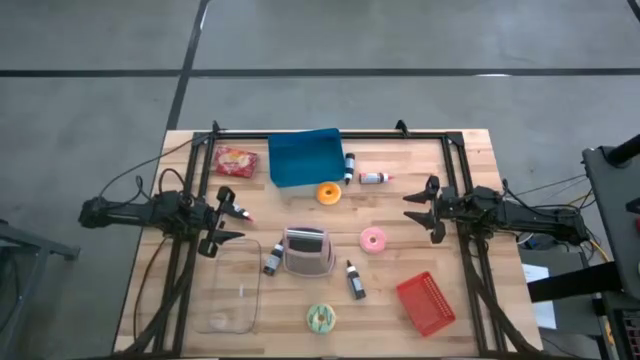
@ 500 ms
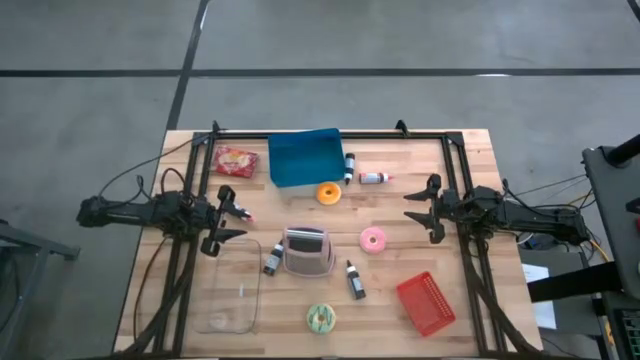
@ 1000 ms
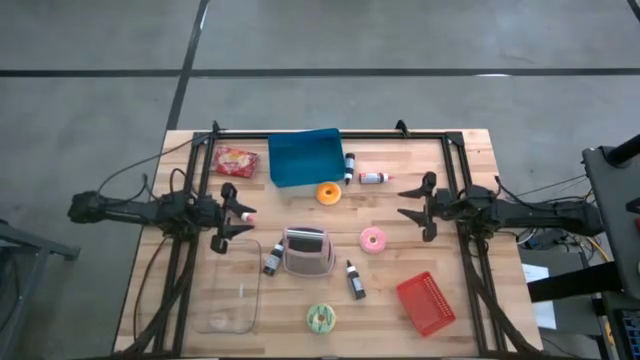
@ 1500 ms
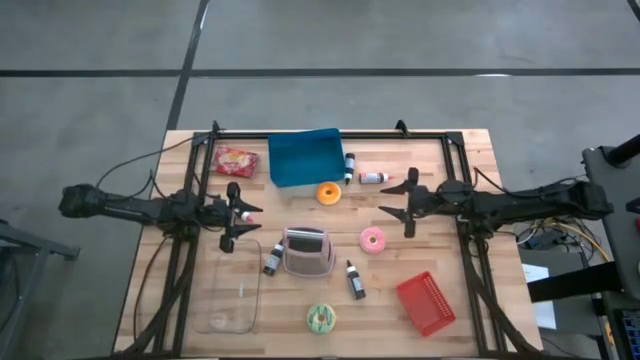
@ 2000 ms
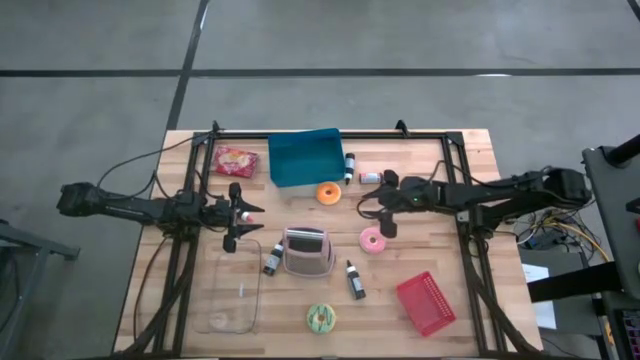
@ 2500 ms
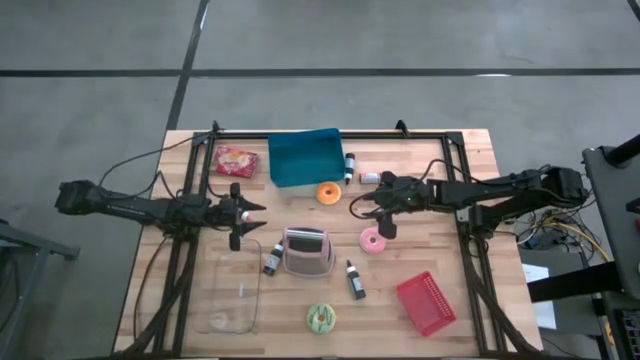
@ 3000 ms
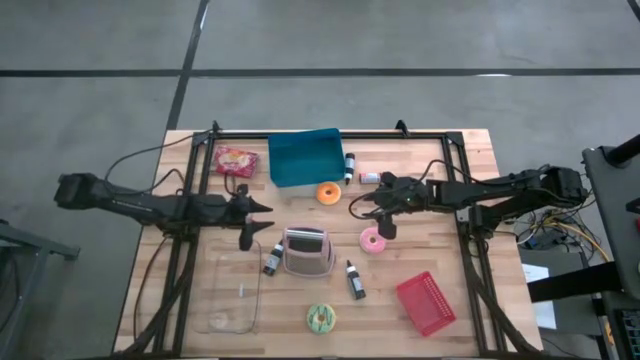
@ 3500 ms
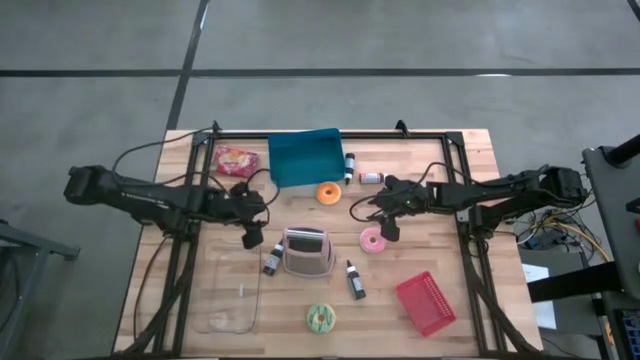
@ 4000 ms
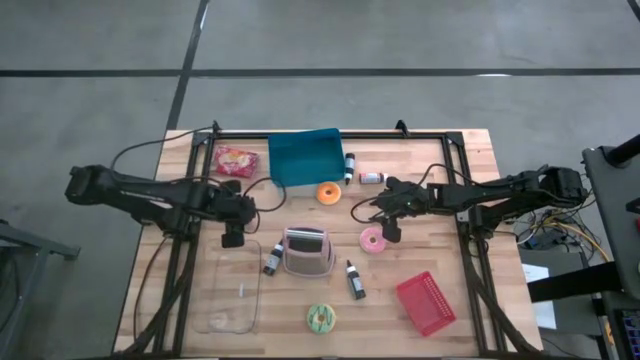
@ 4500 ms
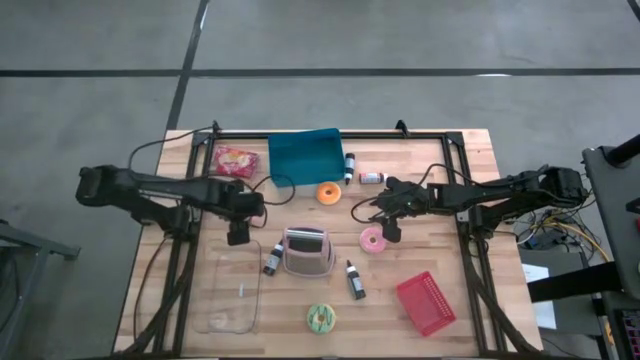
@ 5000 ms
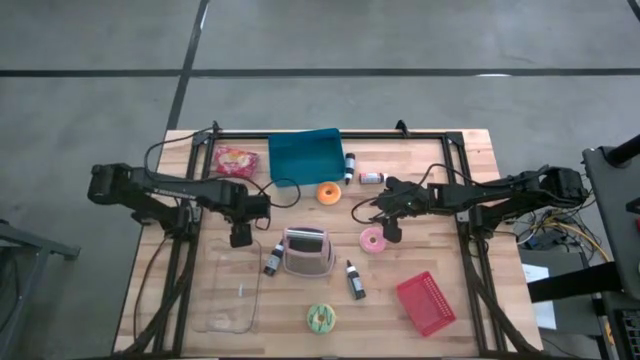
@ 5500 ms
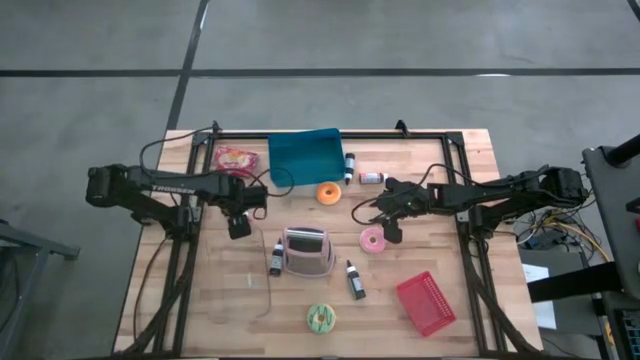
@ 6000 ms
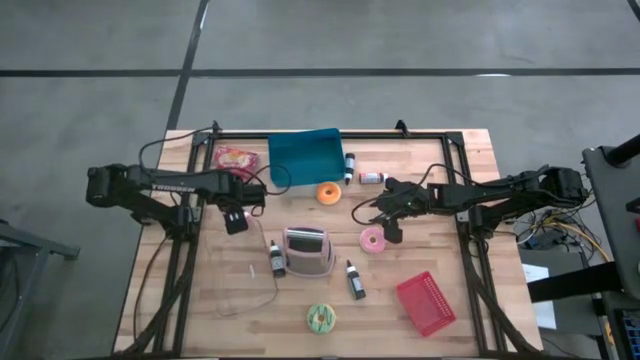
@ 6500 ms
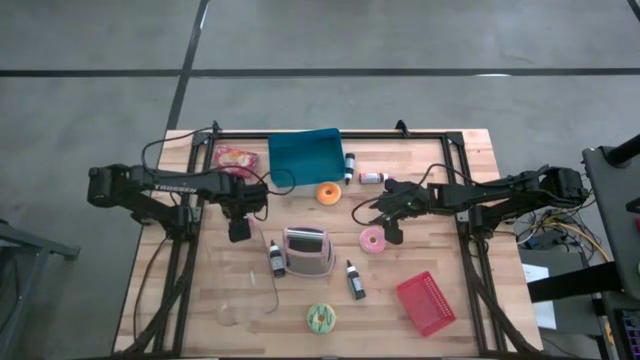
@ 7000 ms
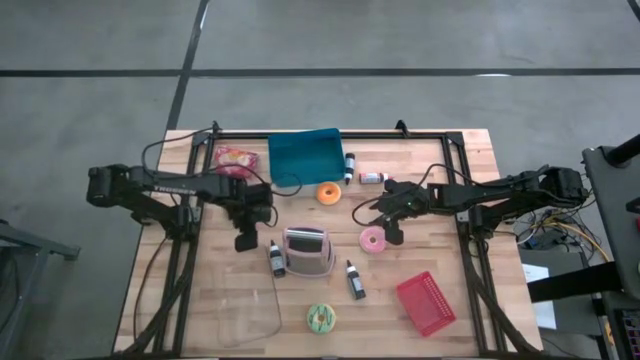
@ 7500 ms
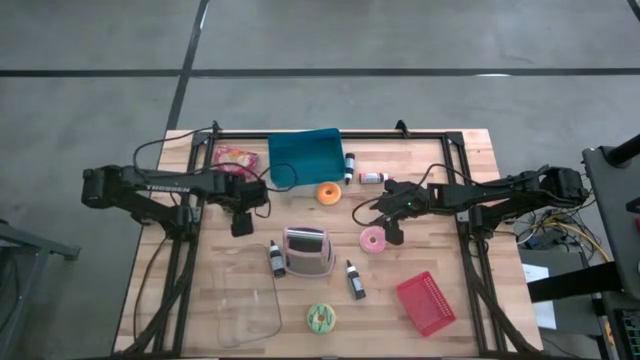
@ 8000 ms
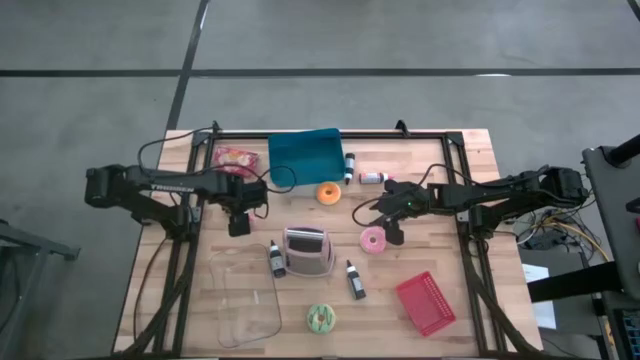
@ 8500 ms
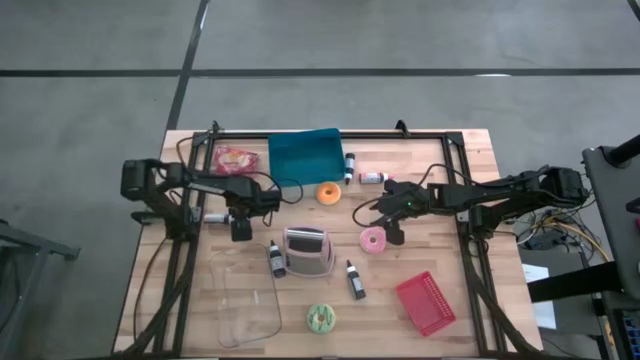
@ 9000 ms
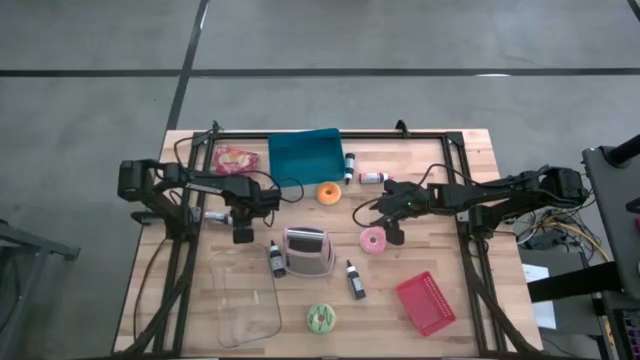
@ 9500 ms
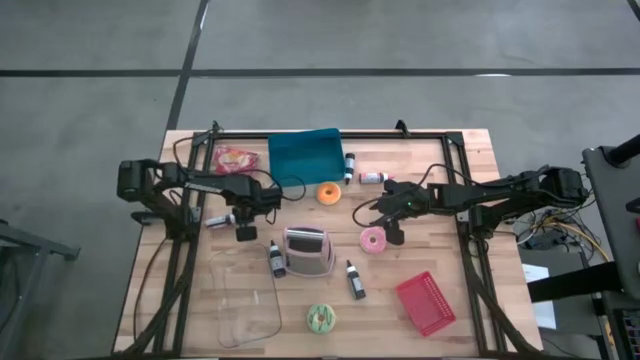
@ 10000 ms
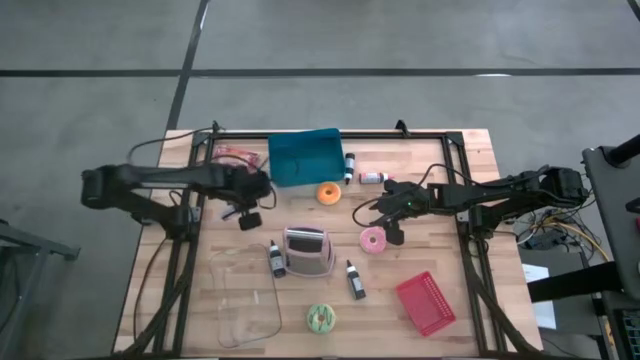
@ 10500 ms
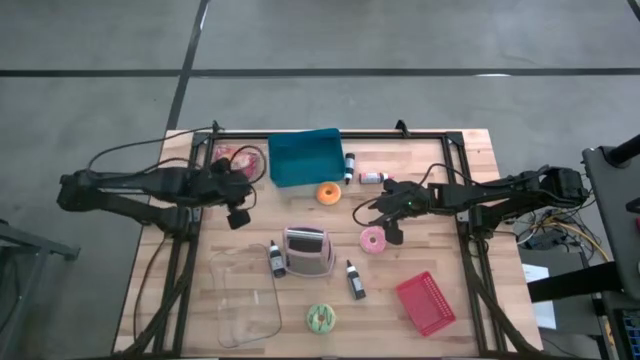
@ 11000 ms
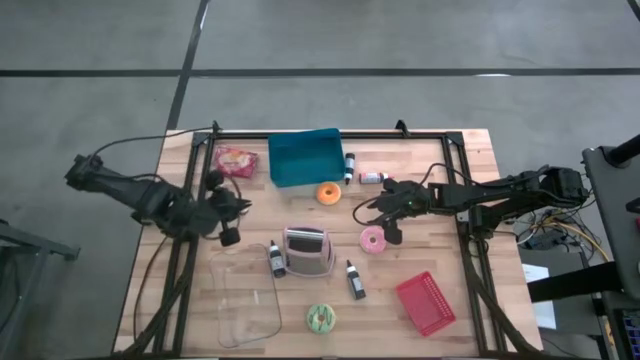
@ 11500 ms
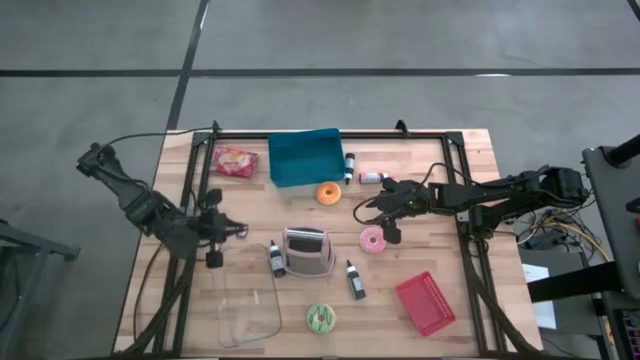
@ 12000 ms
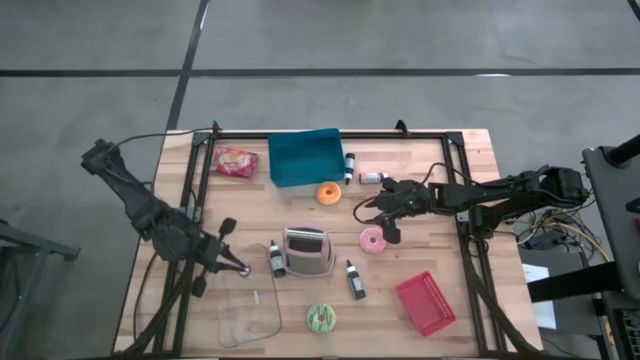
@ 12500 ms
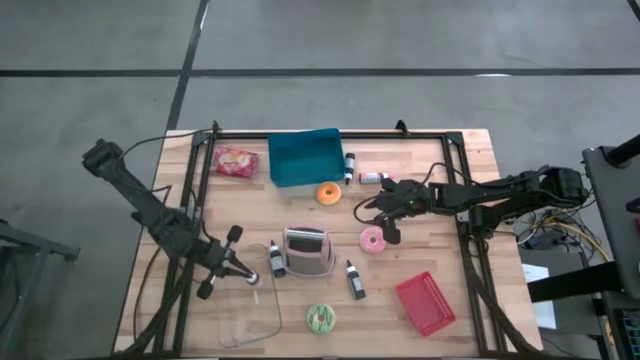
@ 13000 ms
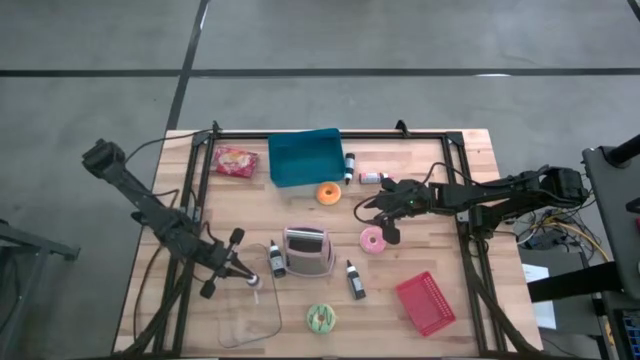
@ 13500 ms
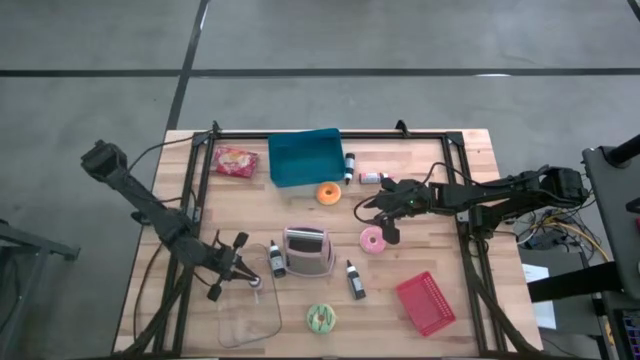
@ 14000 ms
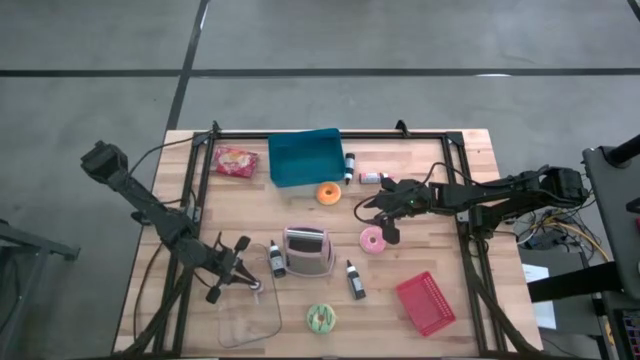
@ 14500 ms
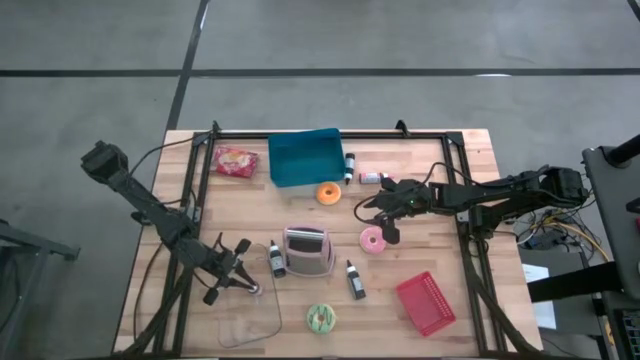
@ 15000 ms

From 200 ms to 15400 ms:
Task: Pick & Place Food Item
Put the left pink food coloring bottle into the transparent bin

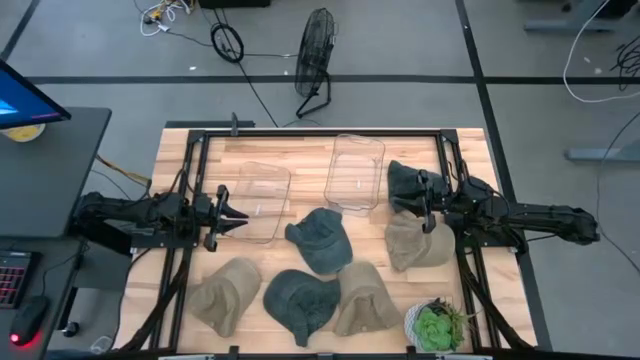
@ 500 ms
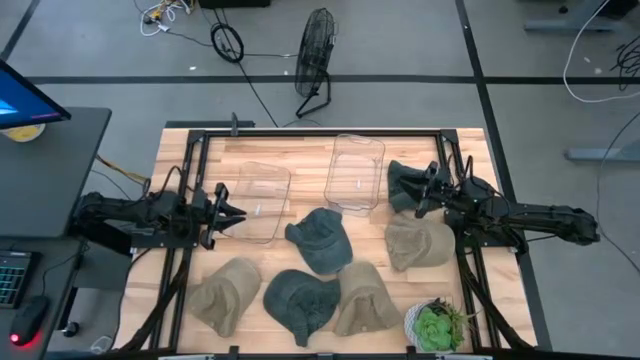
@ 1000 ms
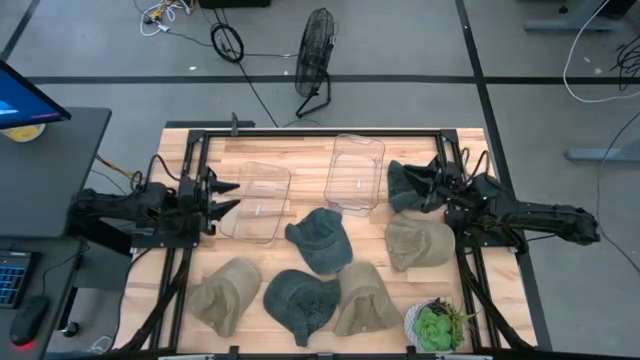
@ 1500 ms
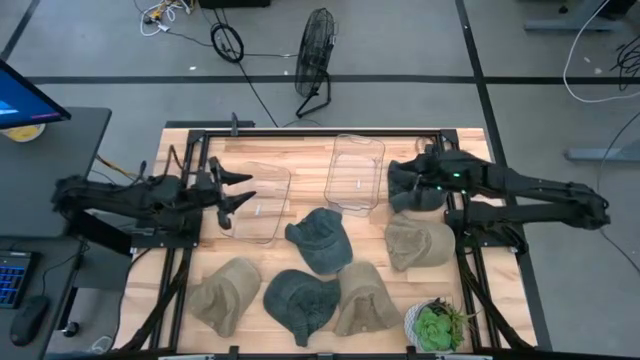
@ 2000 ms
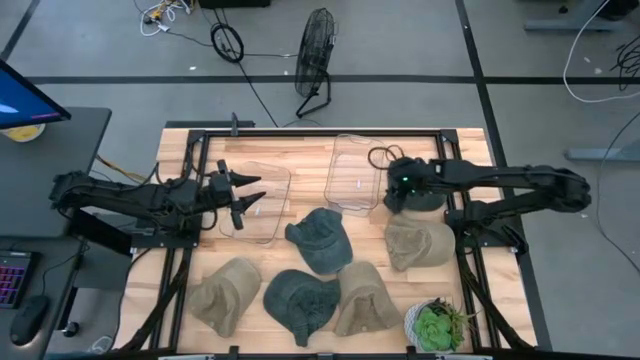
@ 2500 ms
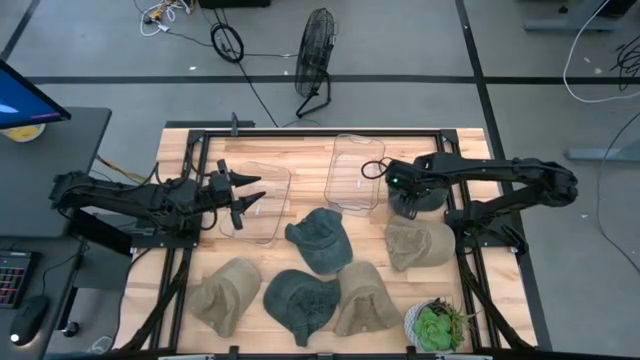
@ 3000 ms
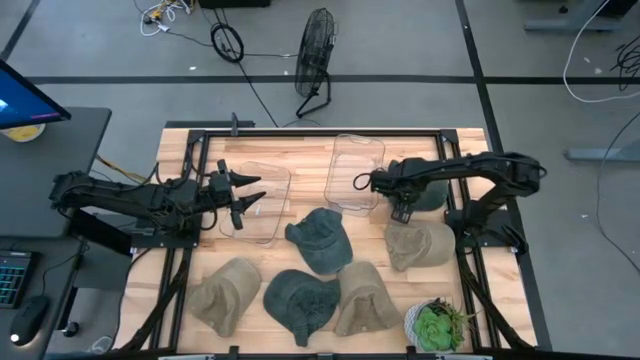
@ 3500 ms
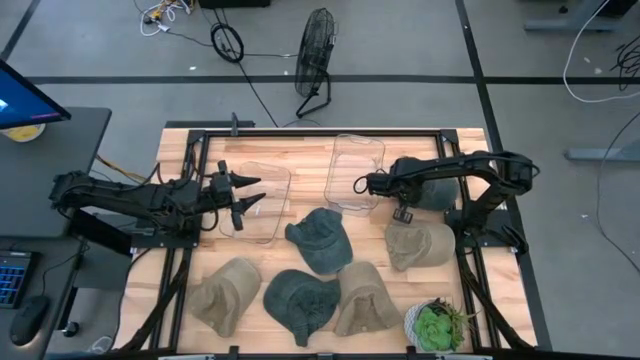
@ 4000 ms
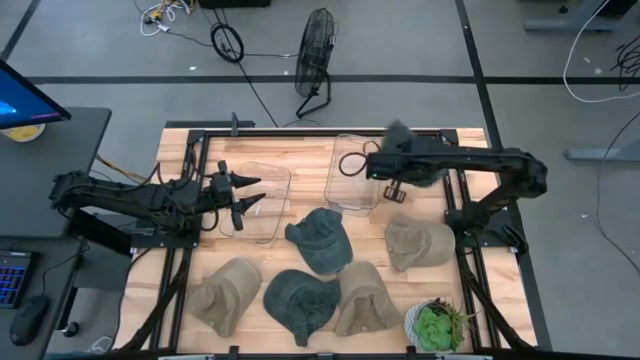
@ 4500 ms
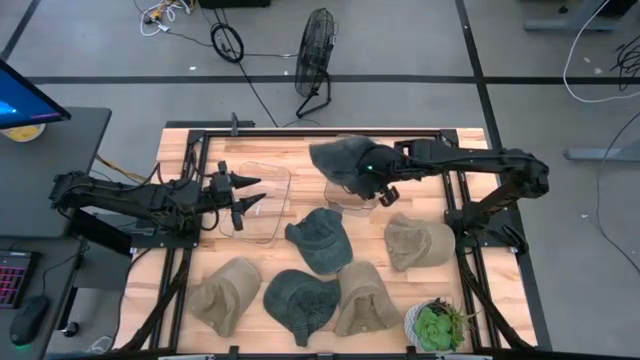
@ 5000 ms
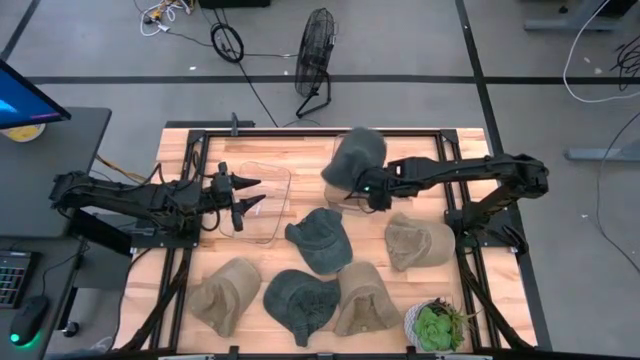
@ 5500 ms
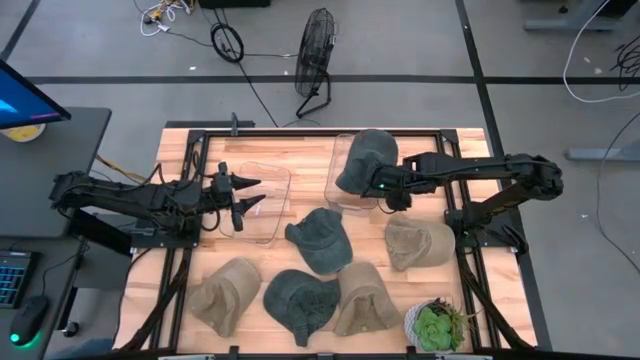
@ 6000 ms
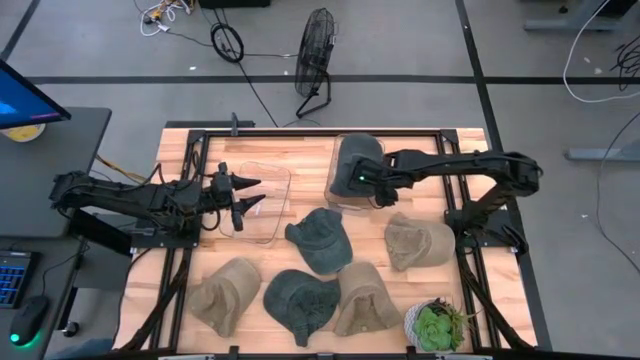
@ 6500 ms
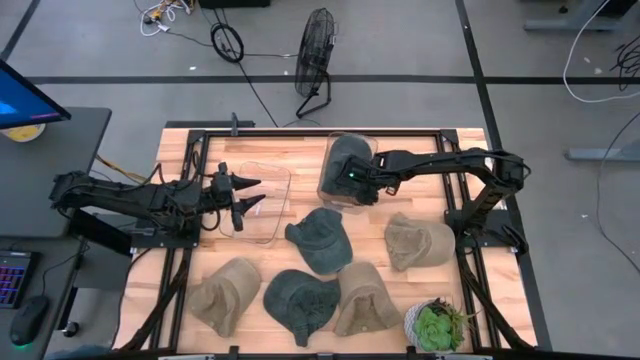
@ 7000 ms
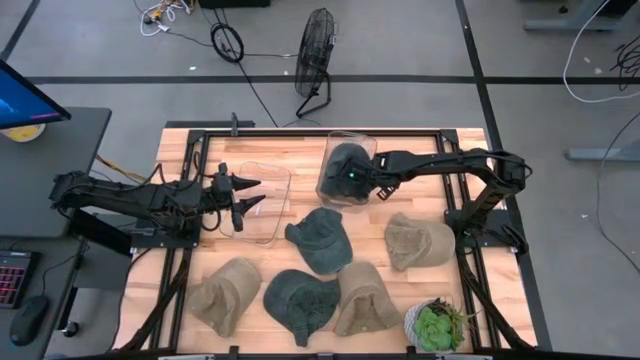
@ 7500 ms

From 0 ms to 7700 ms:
Task: Pick & Place hat
Put the top right blue cap into the right transparent bin
